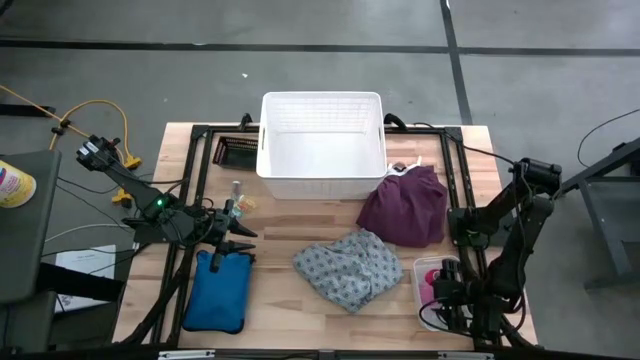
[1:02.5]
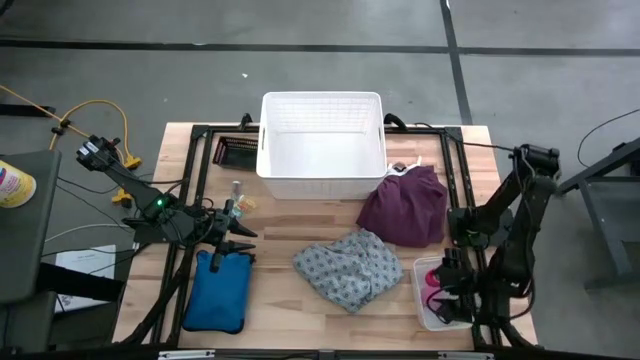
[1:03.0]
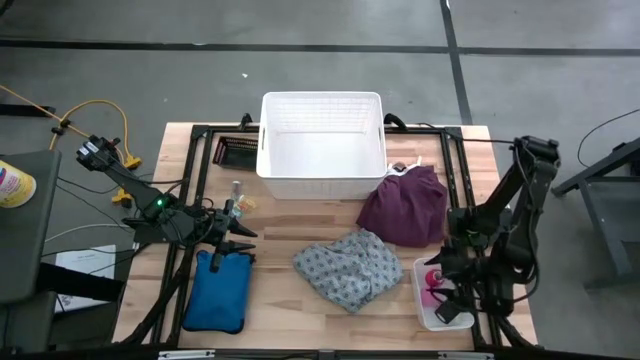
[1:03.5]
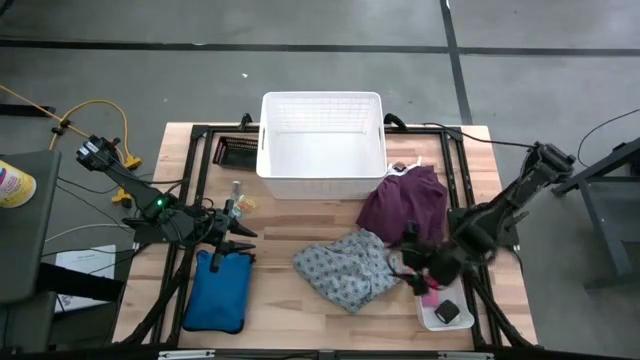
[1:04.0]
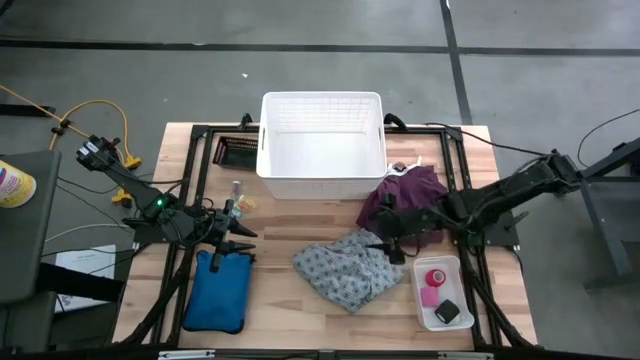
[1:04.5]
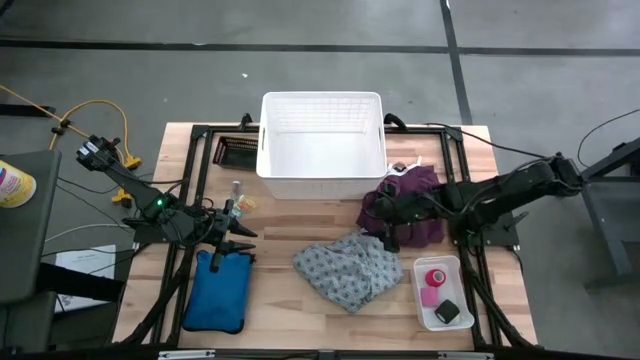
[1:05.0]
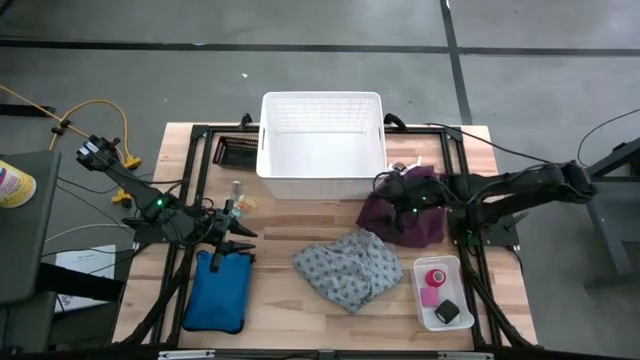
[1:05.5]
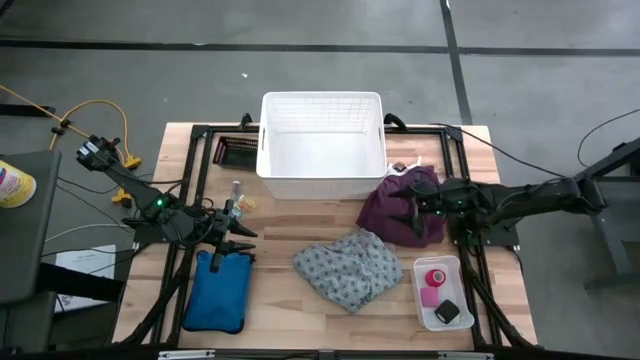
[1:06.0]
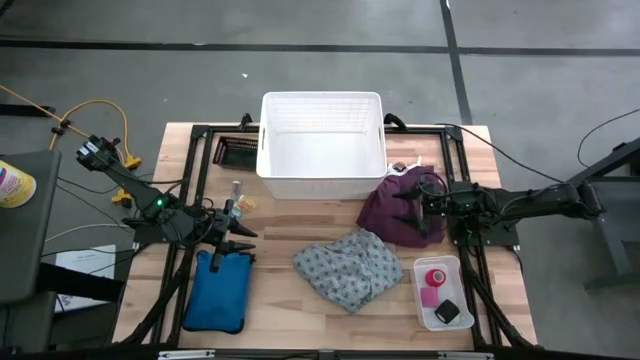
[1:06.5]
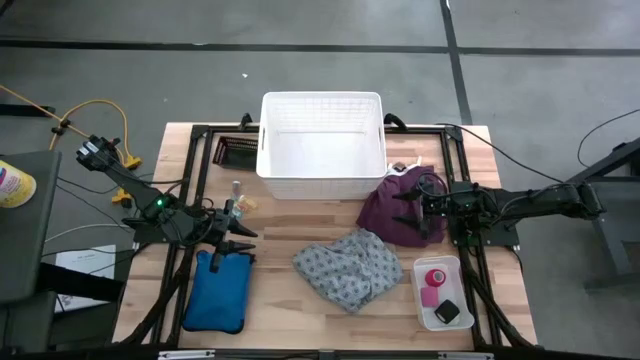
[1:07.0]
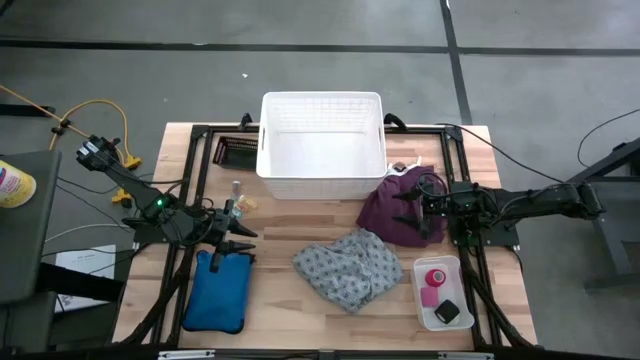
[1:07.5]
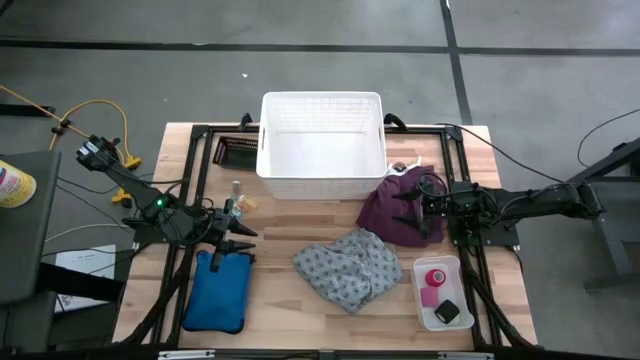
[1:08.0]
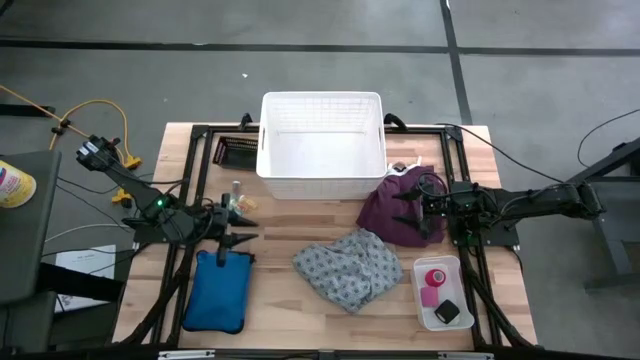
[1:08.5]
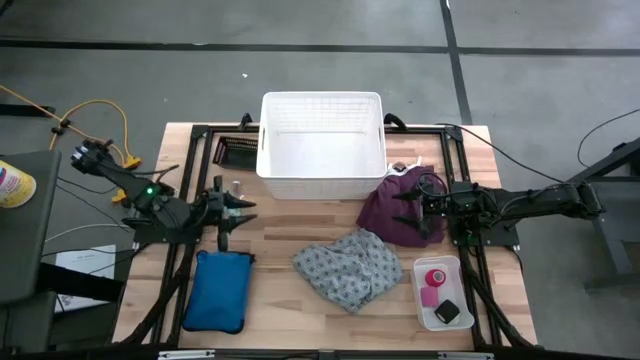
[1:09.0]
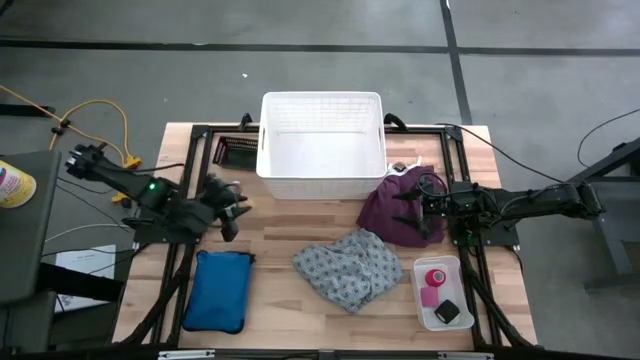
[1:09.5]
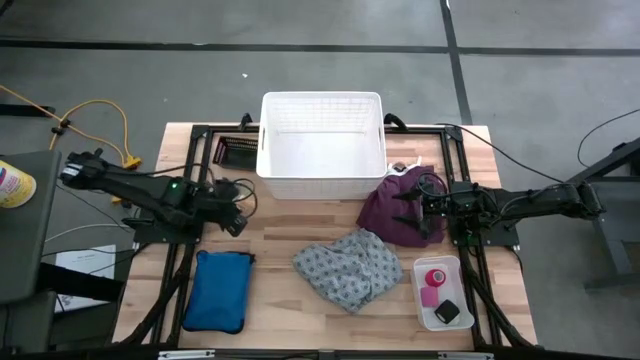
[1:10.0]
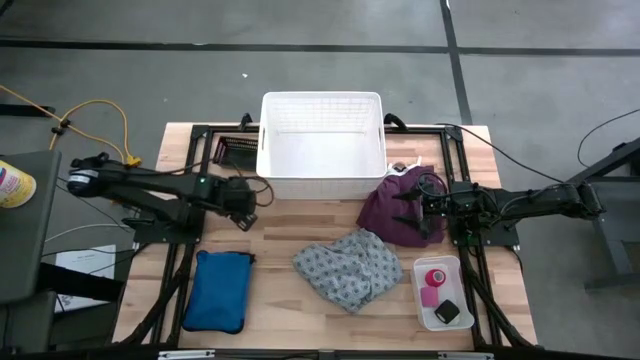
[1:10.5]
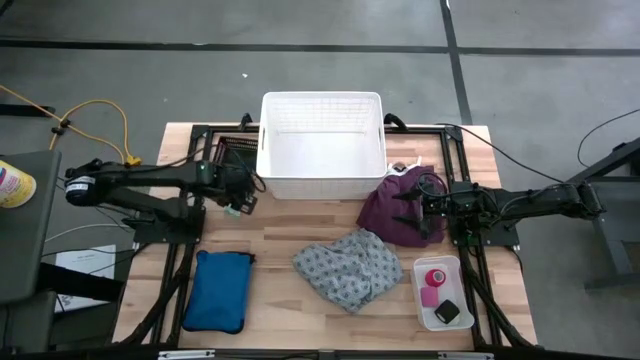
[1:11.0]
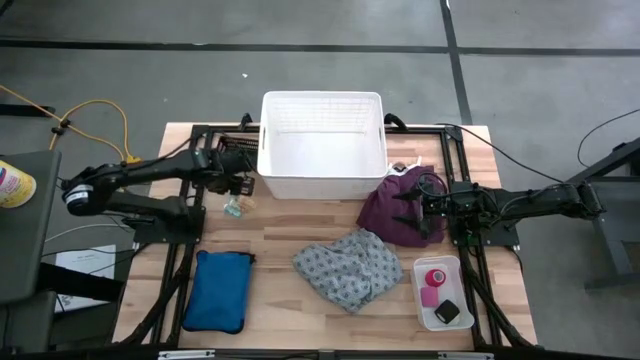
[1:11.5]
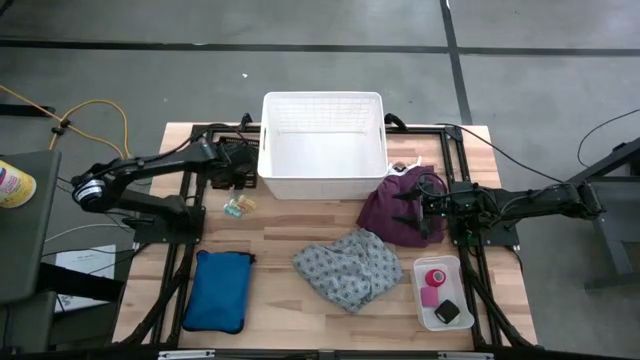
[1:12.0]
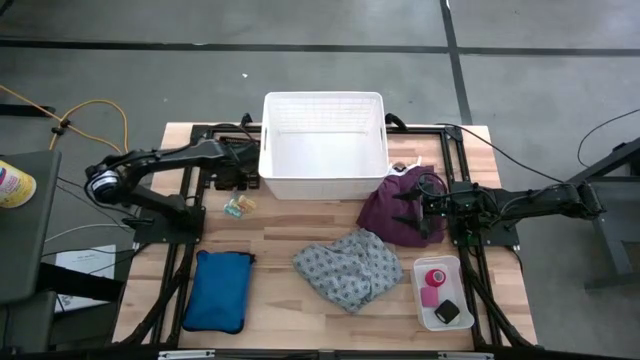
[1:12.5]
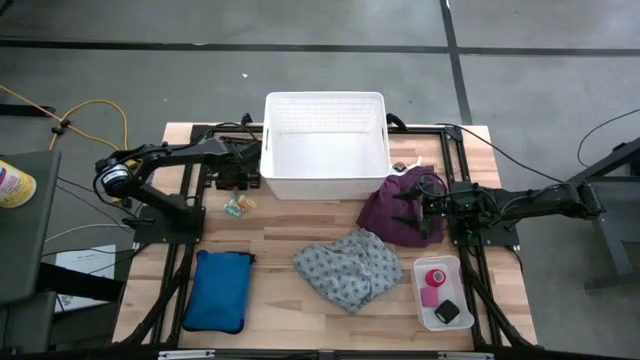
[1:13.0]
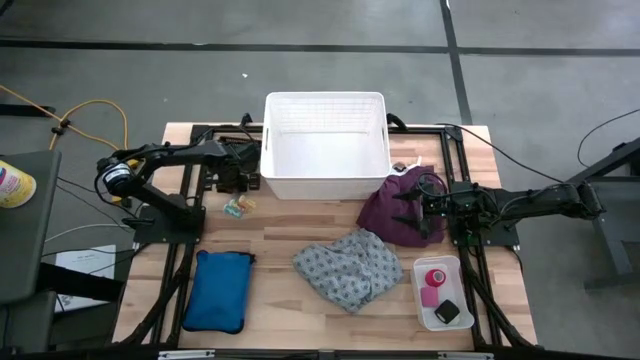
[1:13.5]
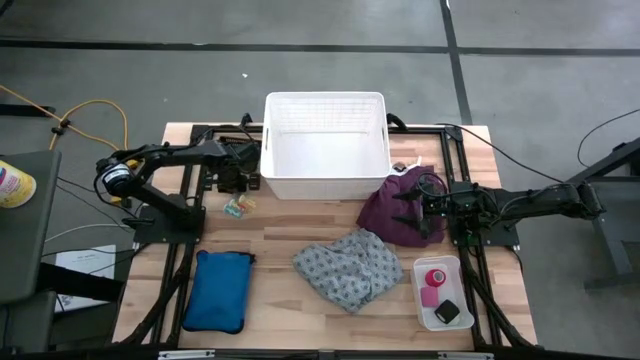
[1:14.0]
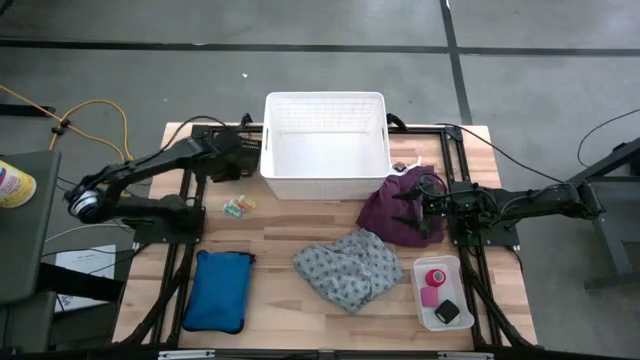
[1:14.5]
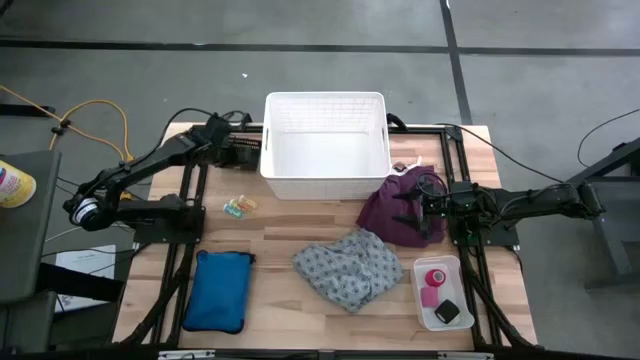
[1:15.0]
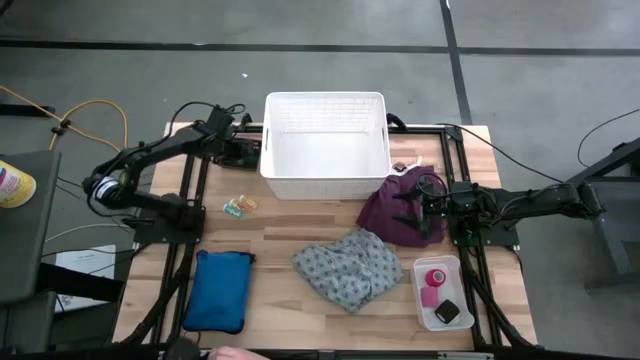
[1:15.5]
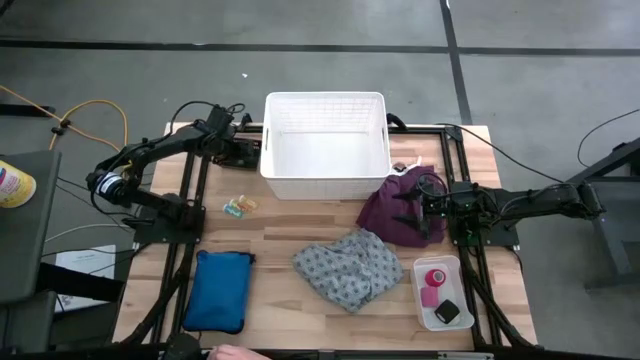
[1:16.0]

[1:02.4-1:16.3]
Task: Pick & place medical supplies in basket/bin
Put the top light green pill bottle into the black bin
